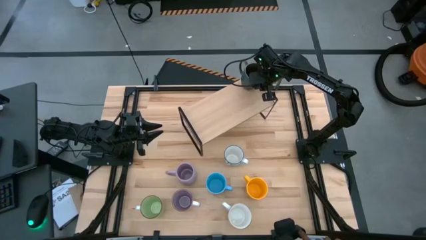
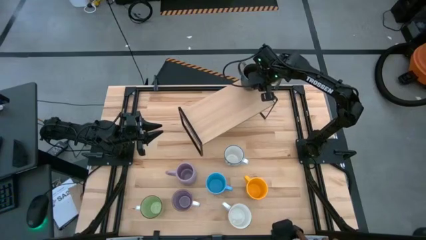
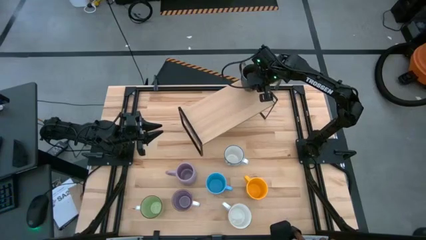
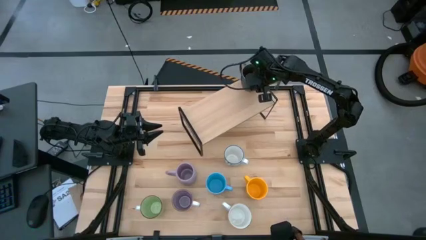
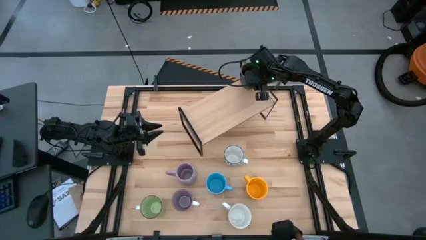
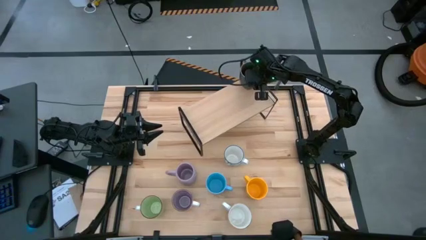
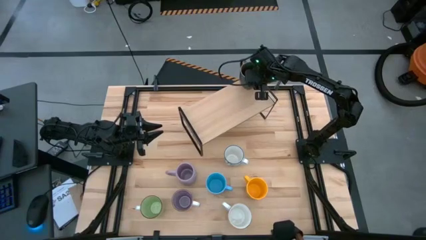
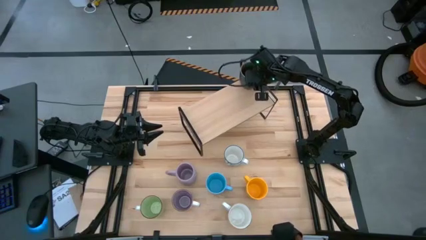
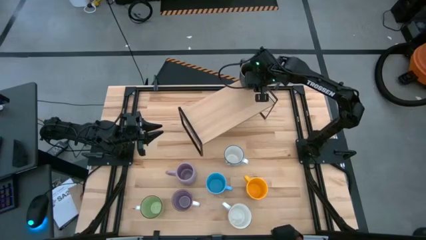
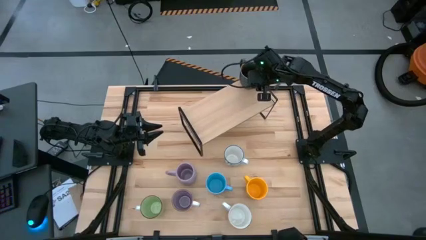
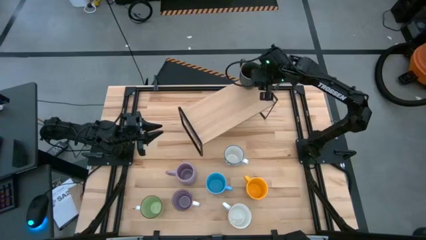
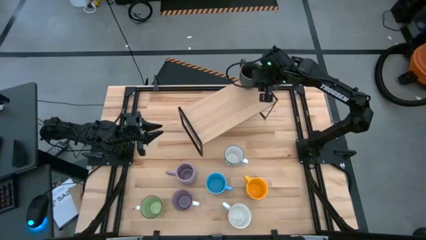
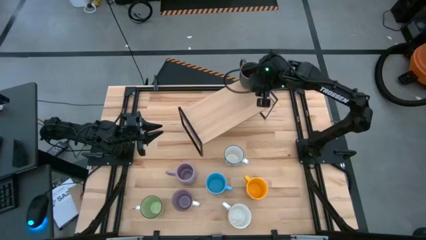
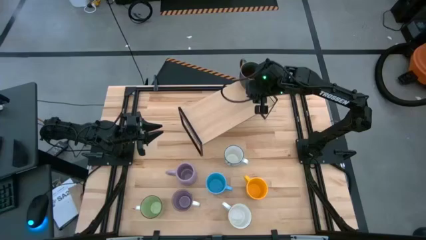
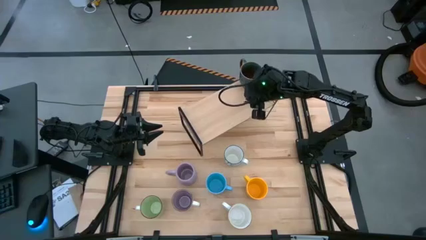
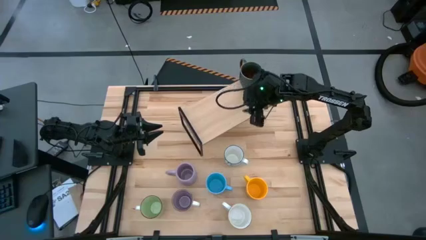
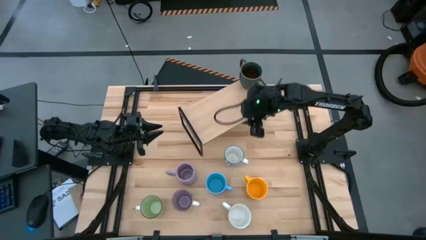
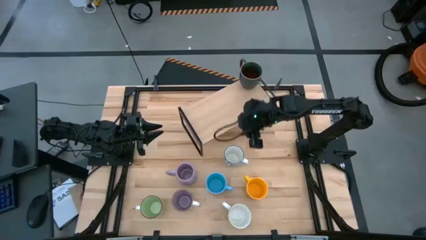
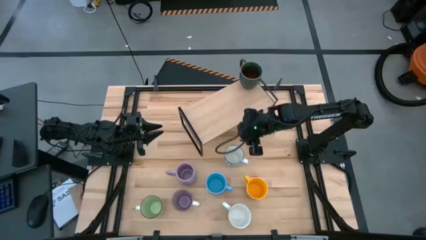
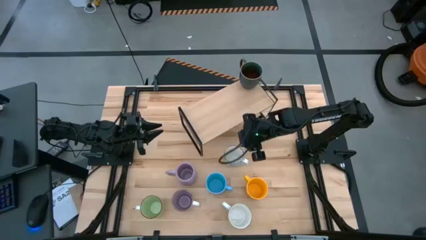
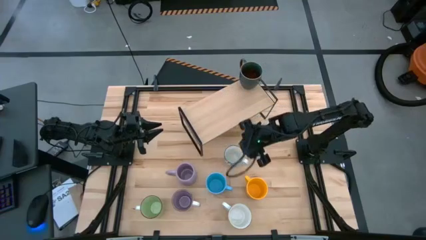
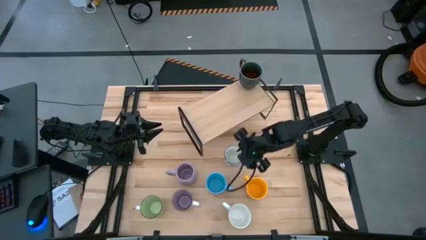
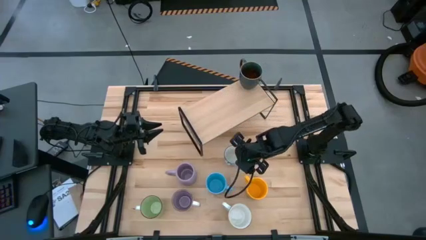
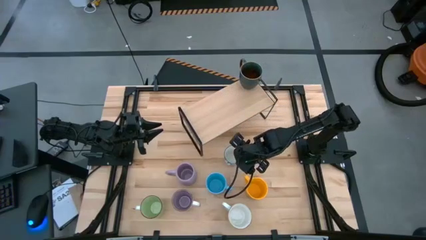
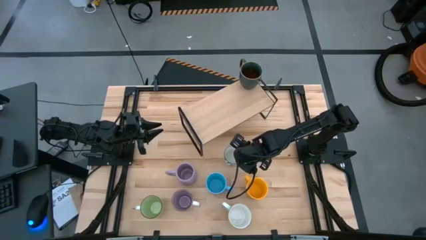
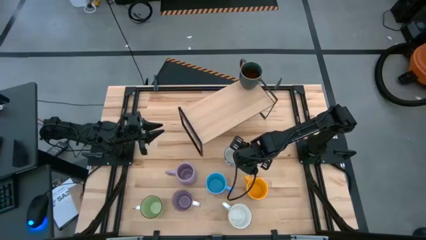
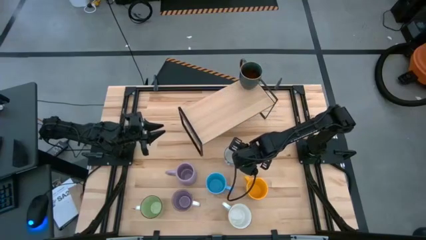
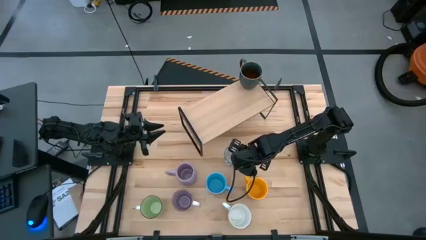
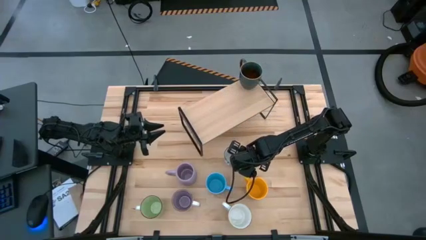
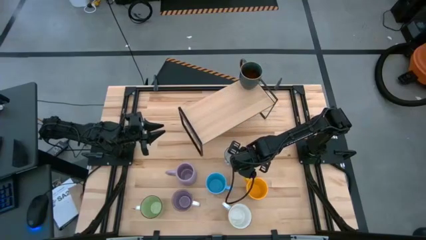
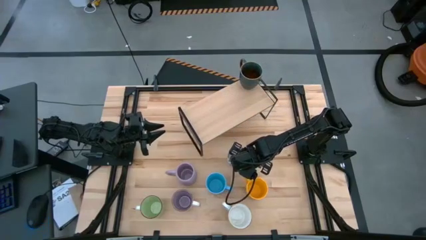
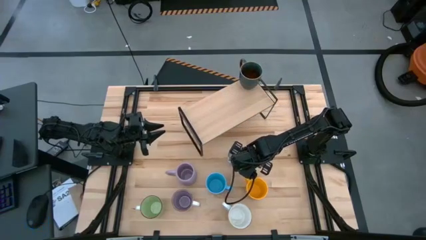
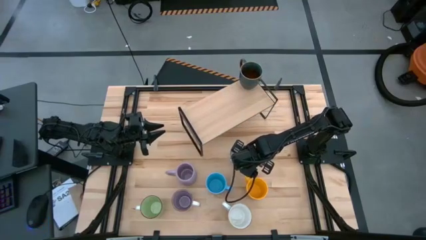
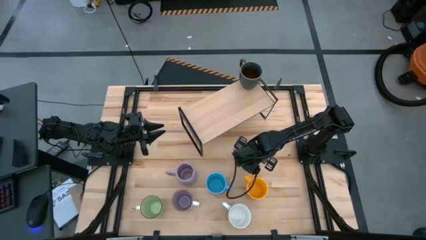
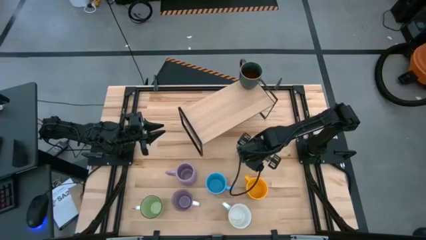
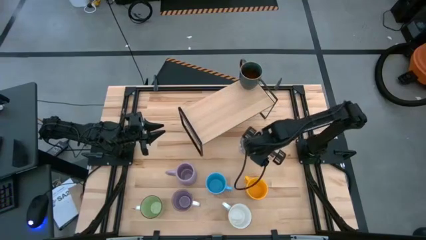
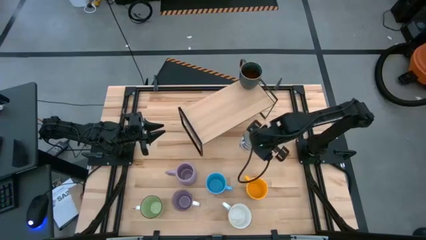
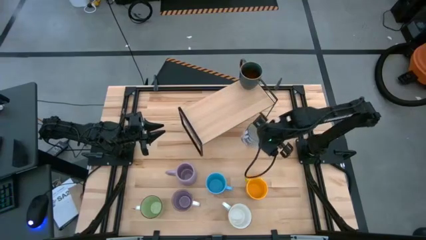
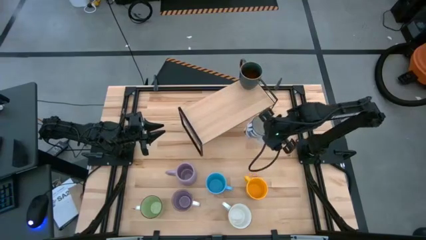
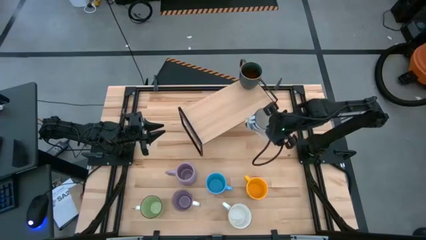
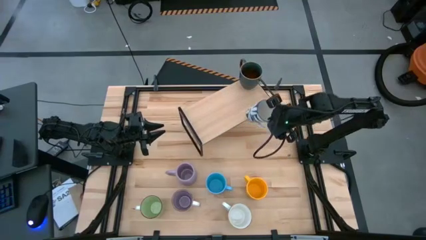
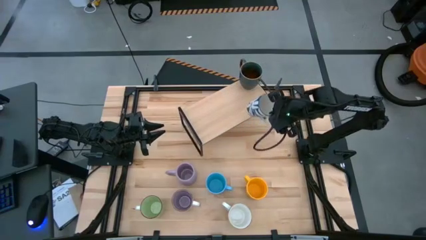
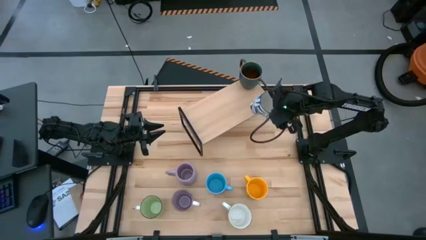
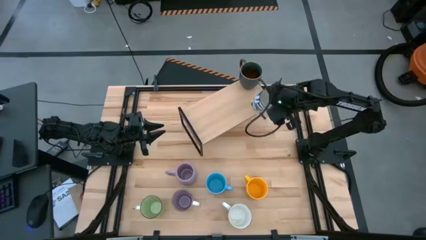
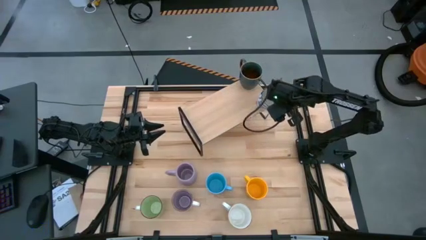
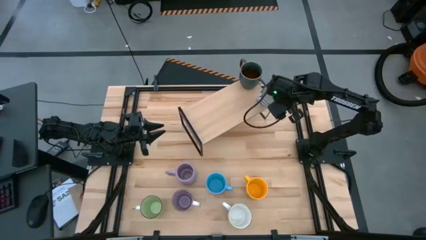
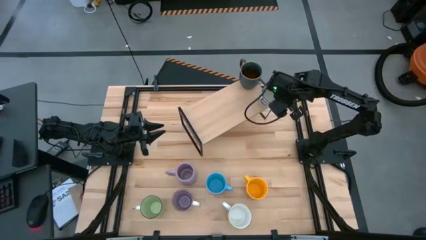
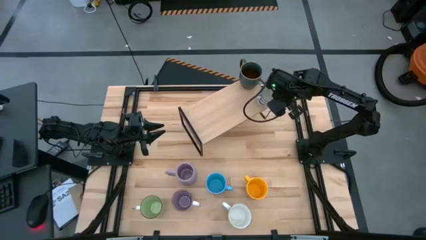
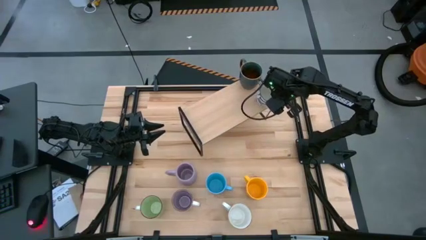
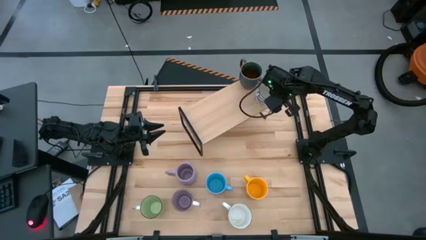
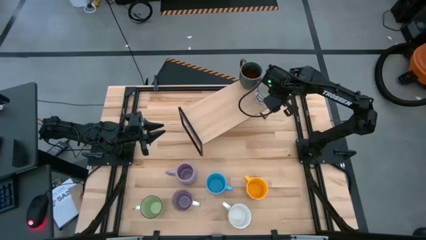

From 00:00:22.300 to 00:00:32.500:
Task: Place coffee mugs
Put the white patterned cup on the shelf
